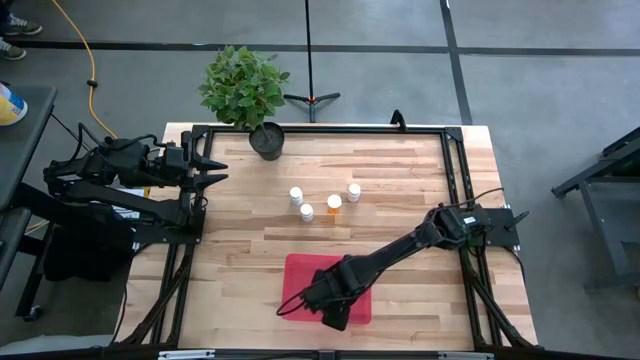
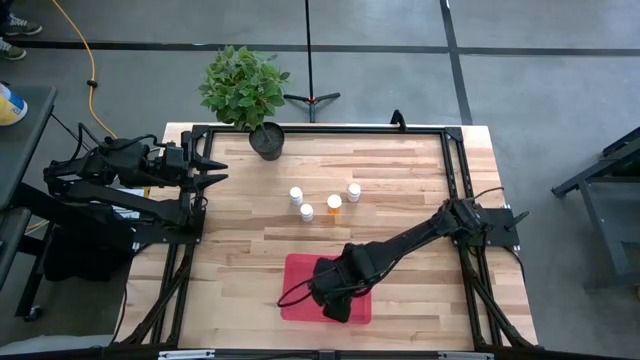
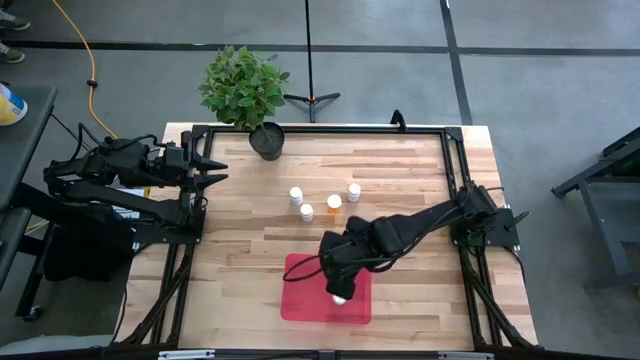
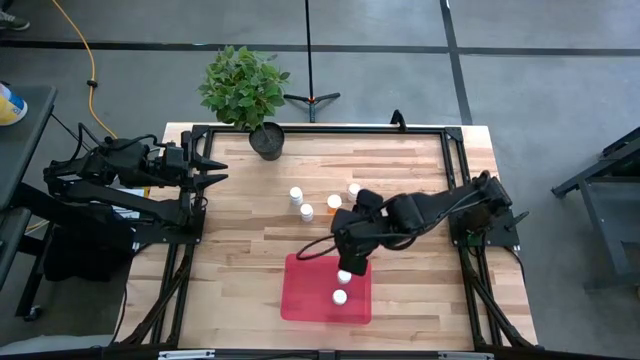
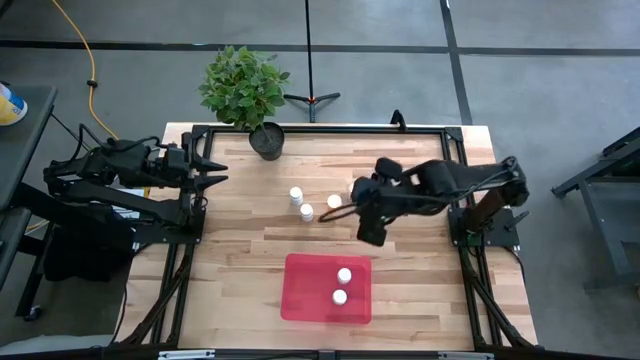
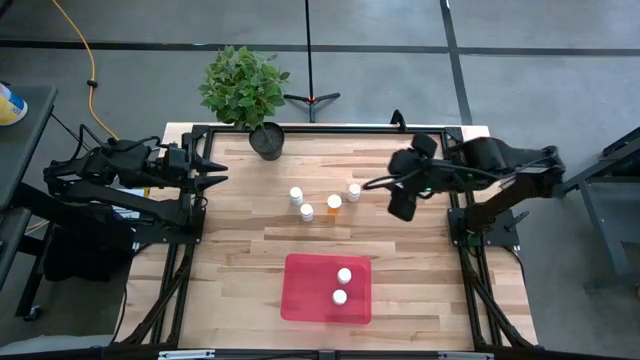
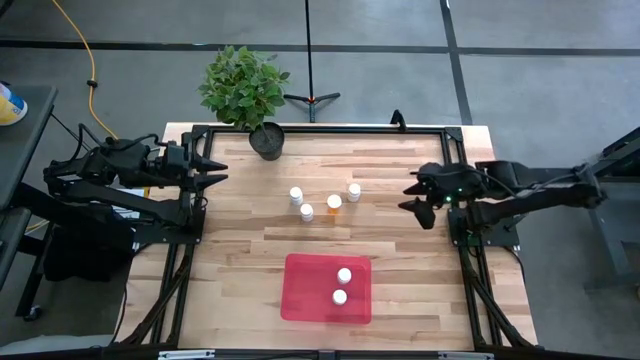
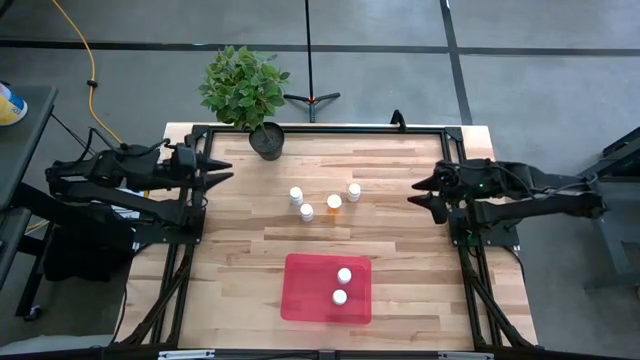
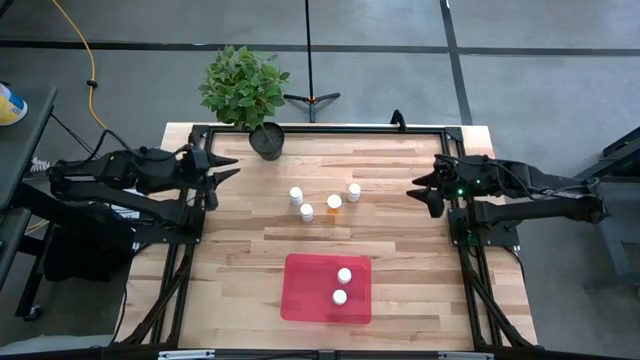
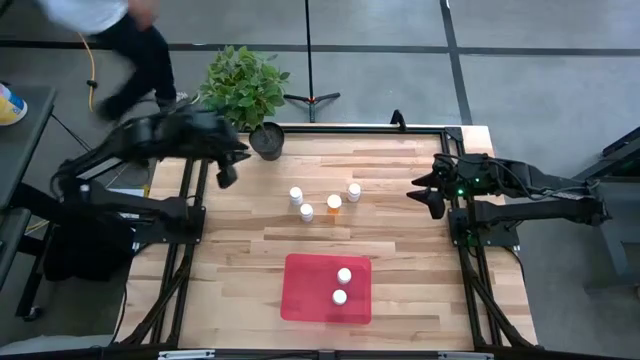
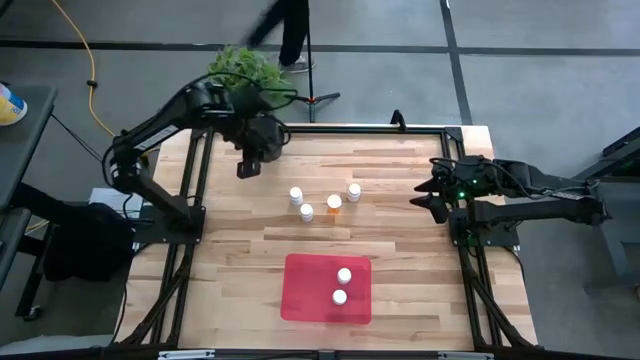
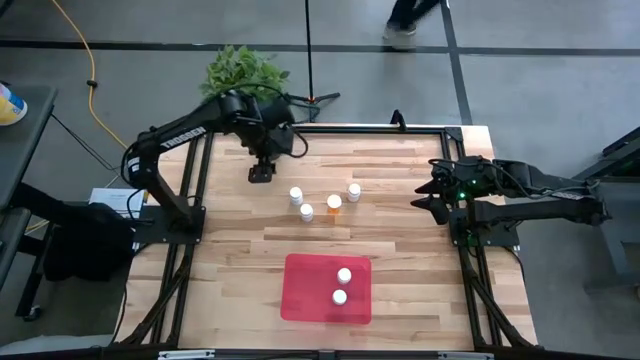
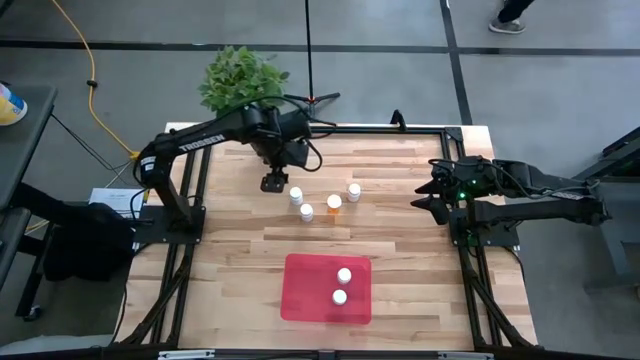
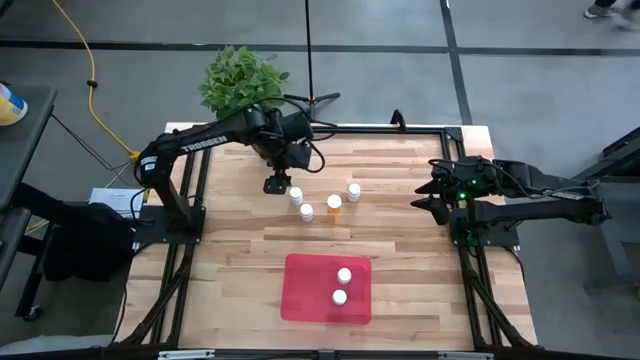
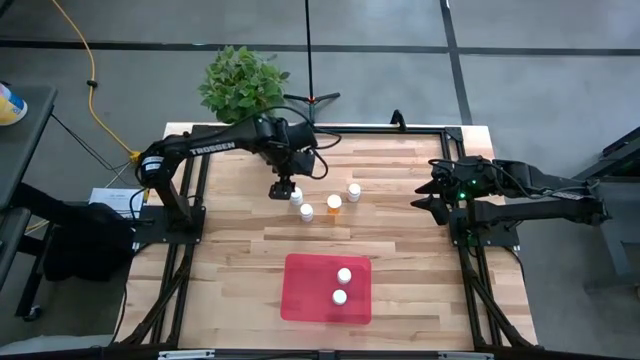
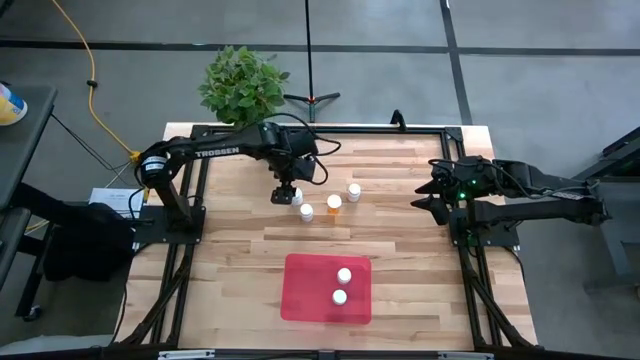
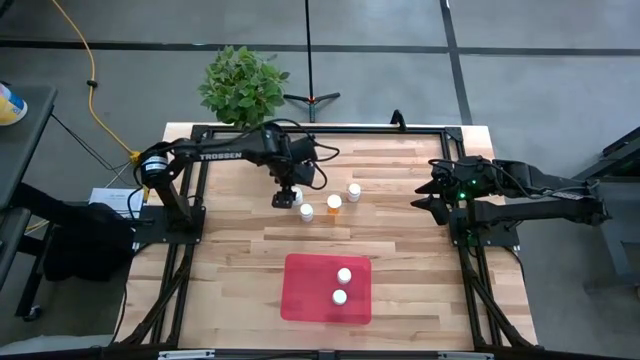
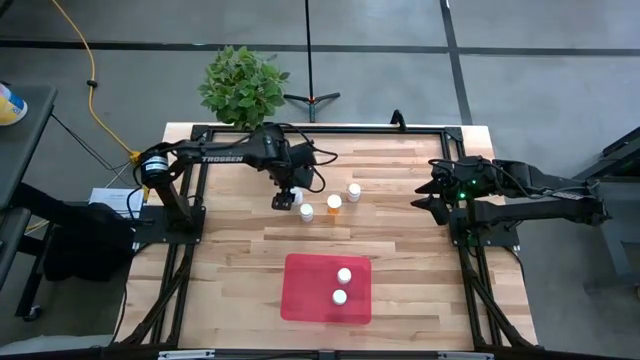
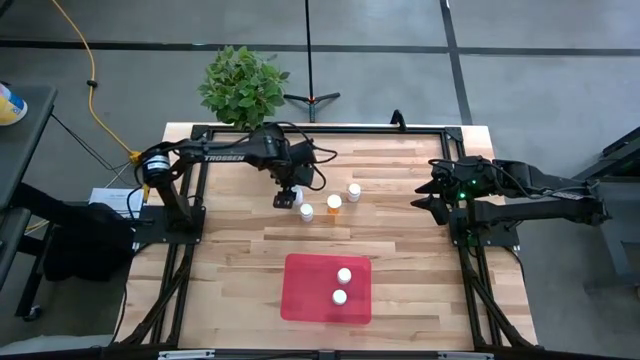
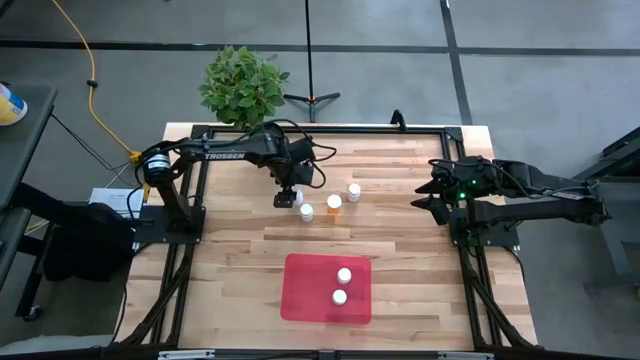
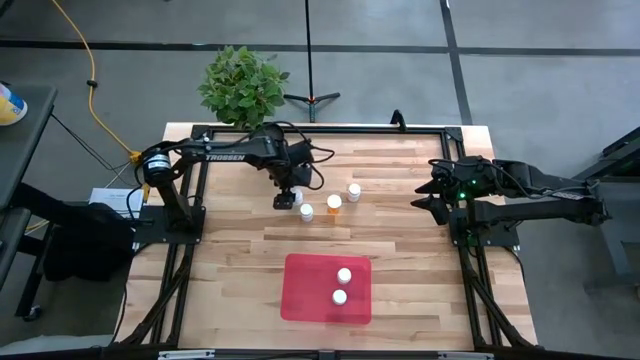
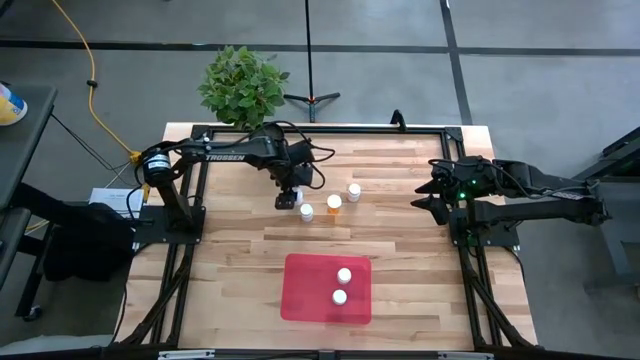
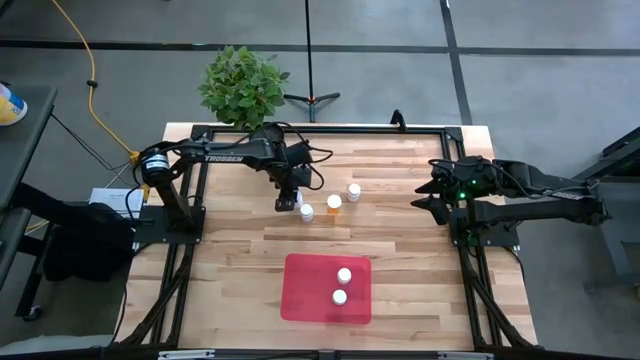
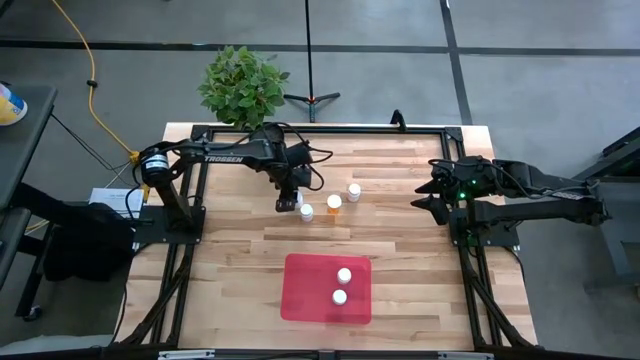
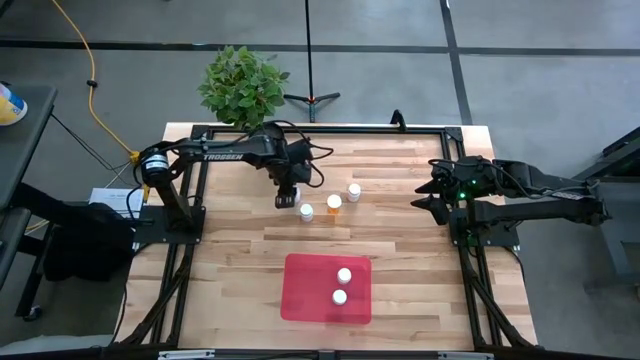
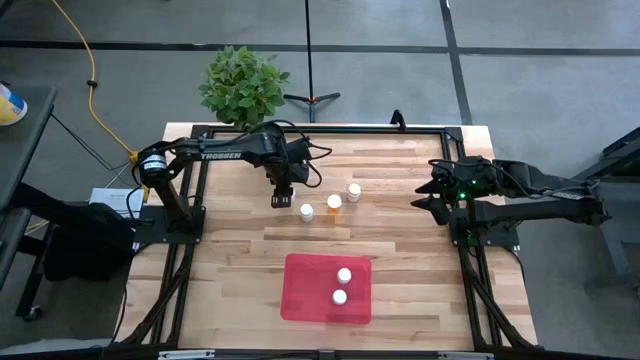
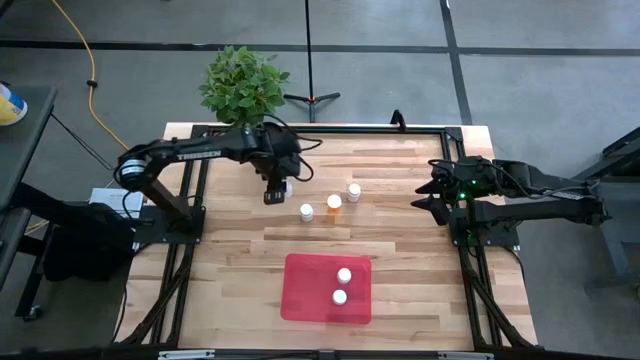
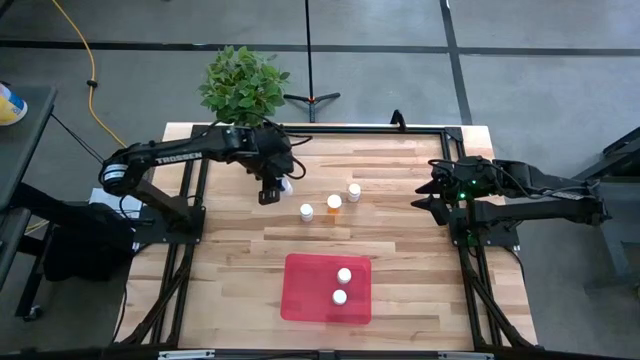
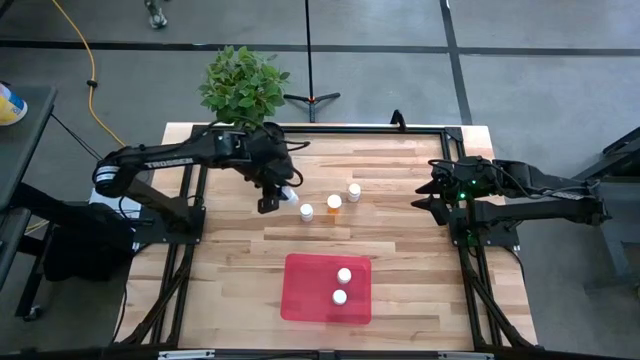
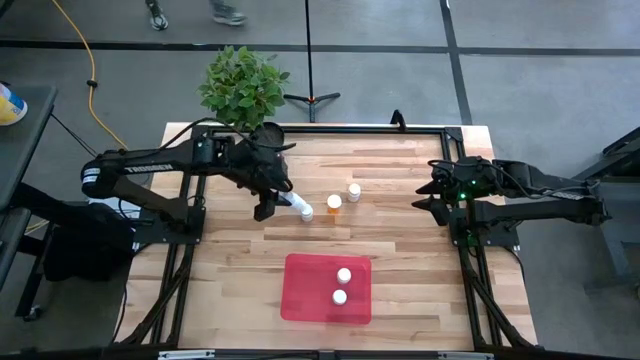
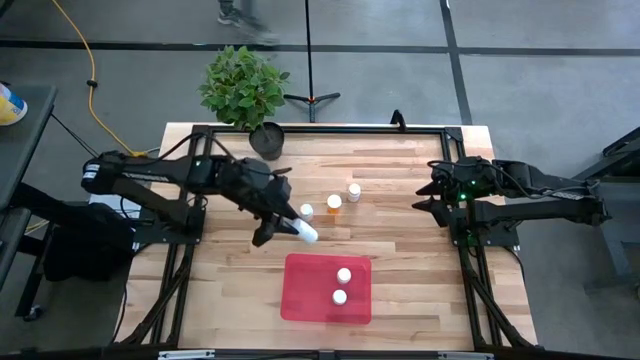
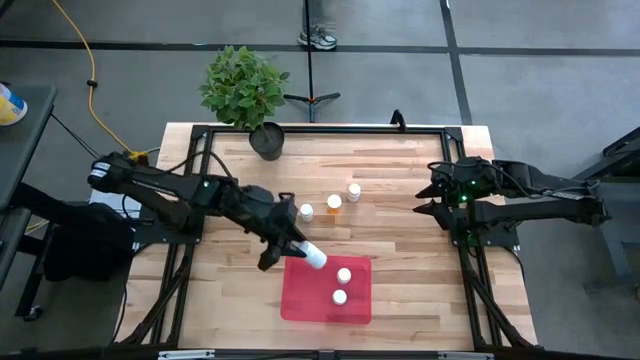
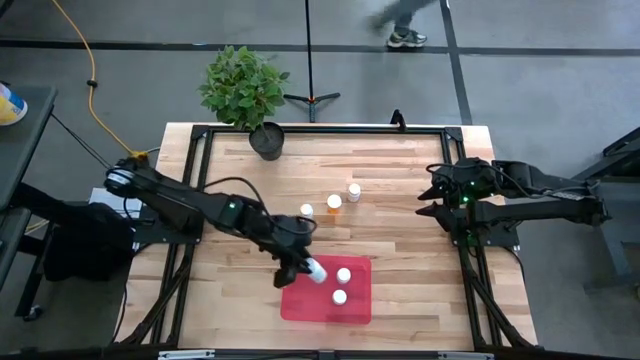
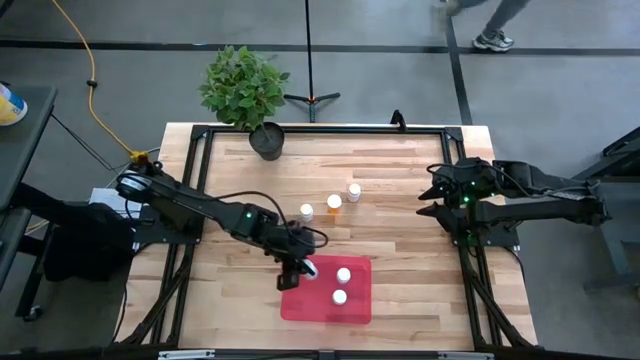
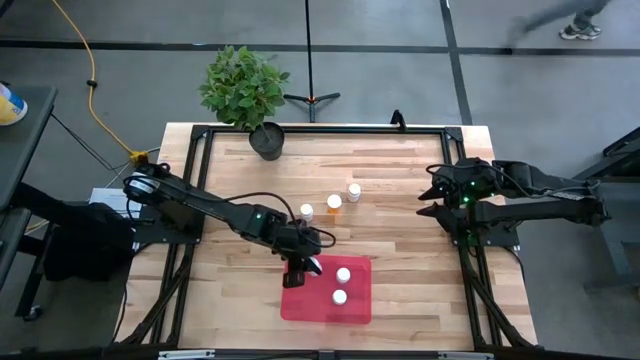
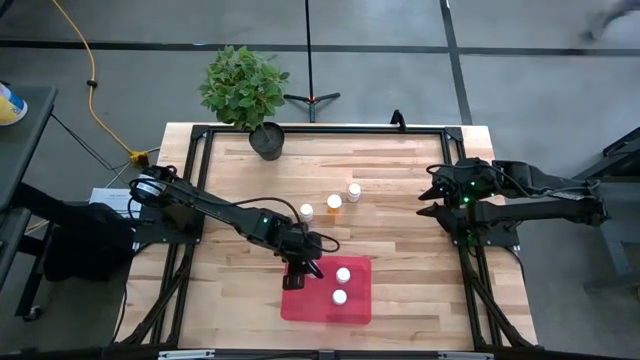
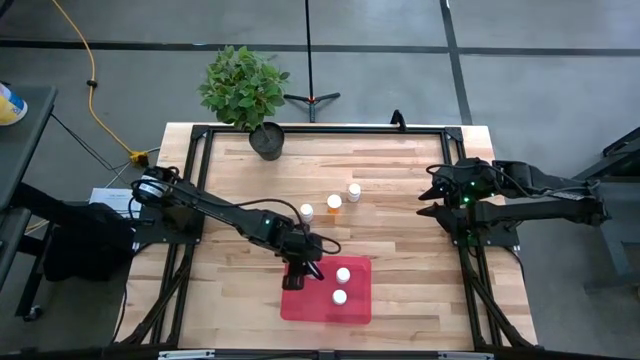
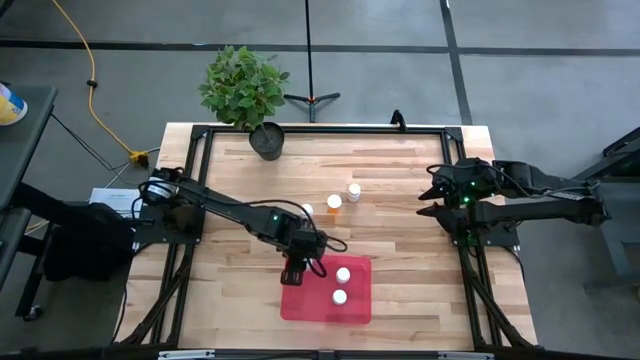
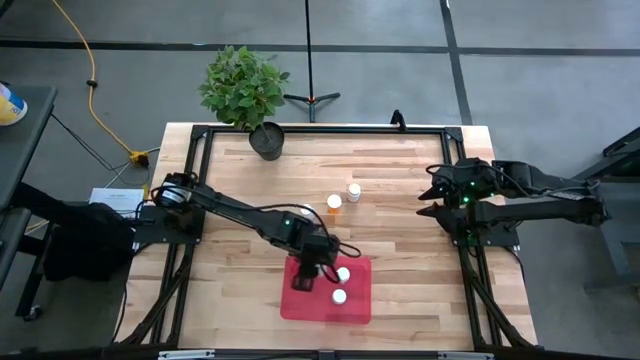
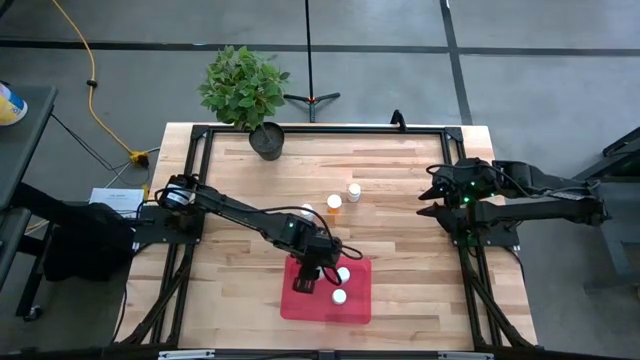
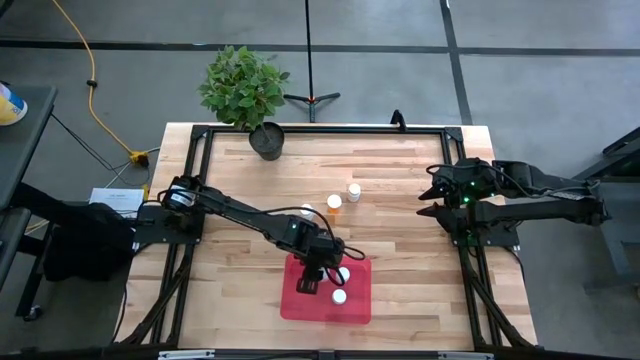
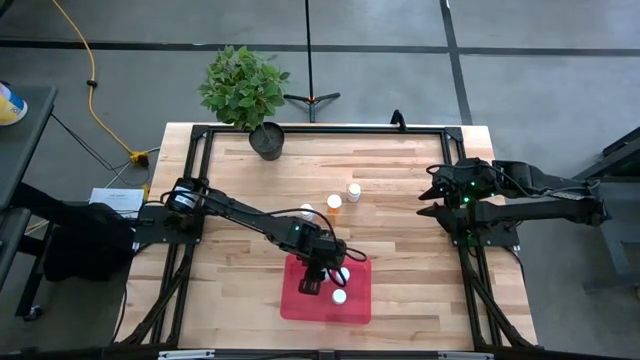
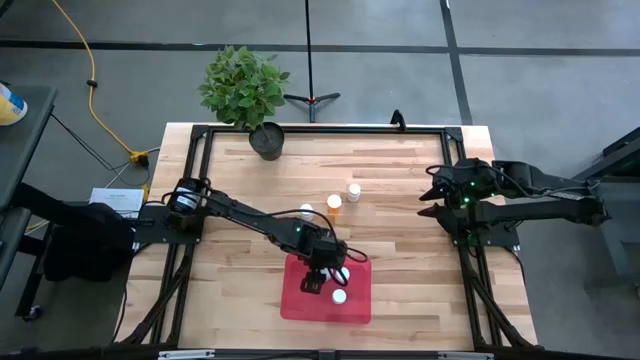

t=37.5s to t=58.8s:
Task: Pick and place pill bottles into a basket
Put the white pill bottle into the red bin

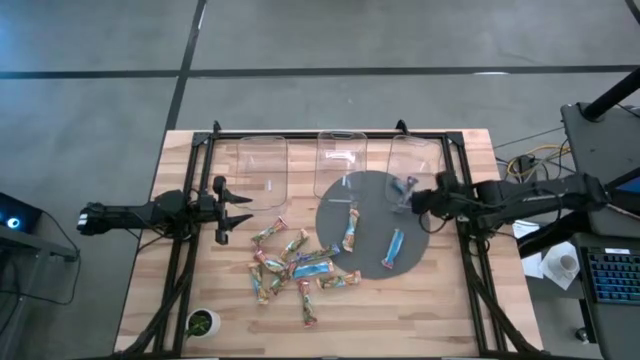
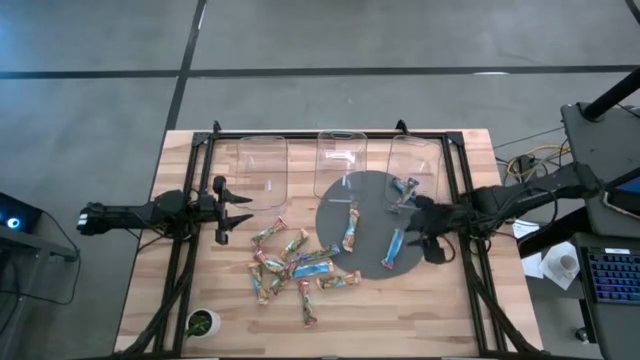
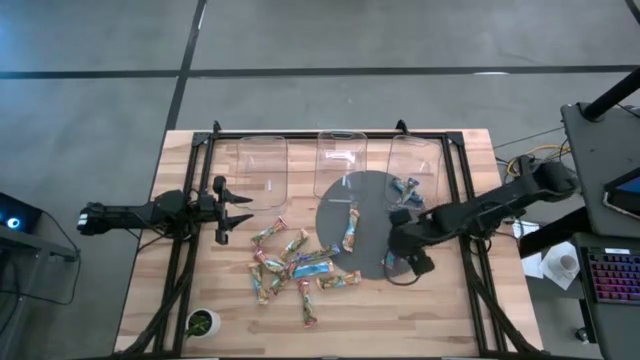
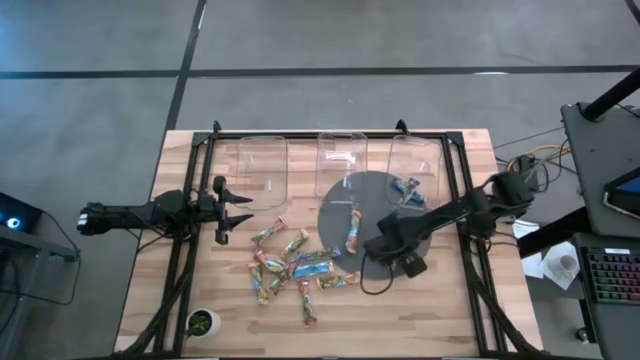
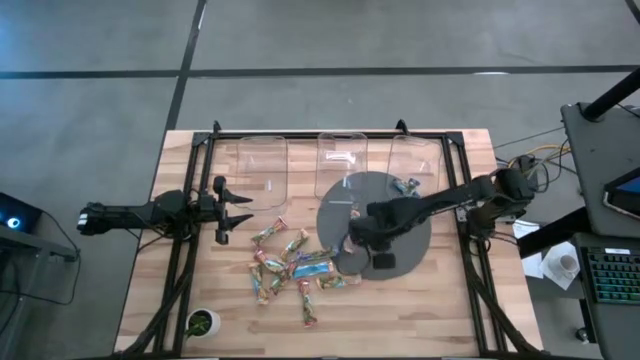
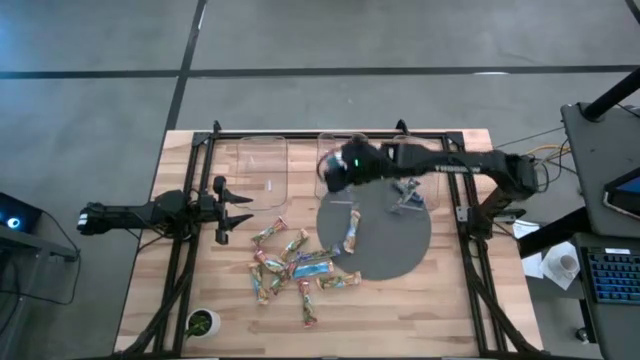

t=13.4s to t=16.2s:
Task: Pick and place Granola Bars by type
Put the red granola bar into the middle transparent bin
